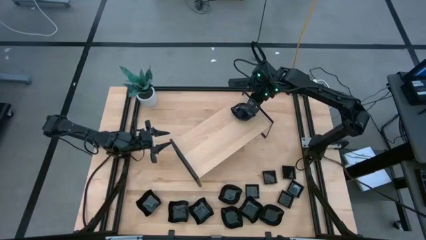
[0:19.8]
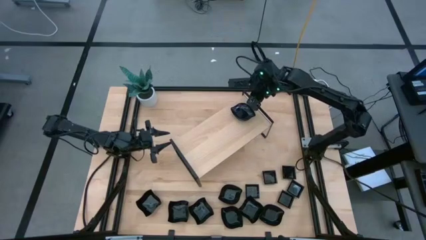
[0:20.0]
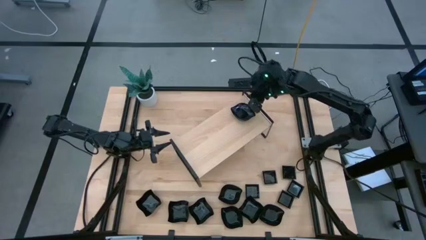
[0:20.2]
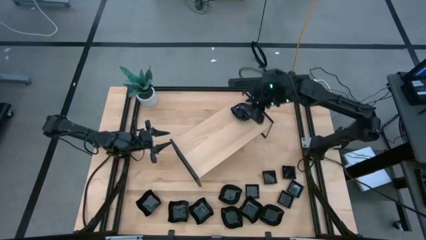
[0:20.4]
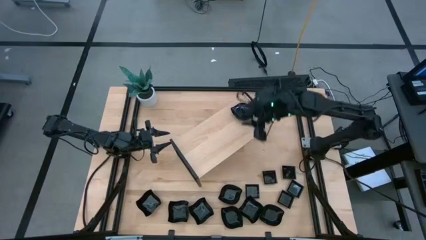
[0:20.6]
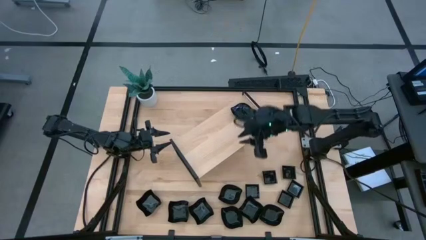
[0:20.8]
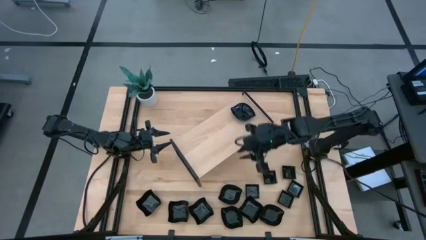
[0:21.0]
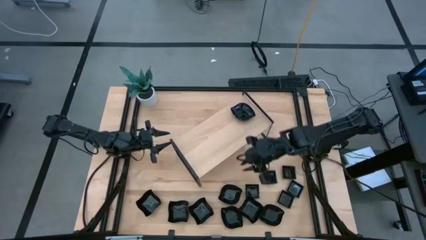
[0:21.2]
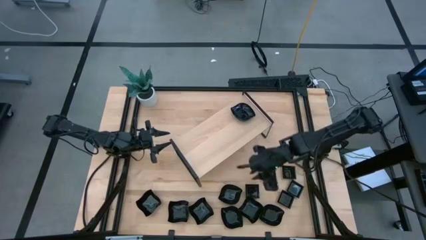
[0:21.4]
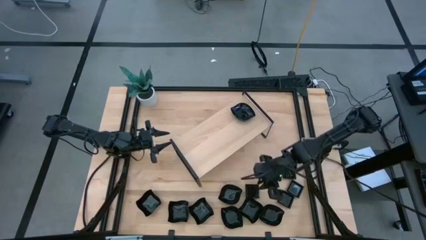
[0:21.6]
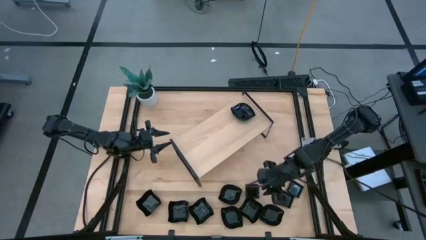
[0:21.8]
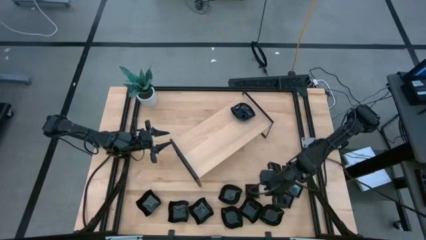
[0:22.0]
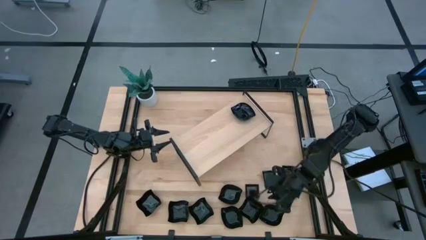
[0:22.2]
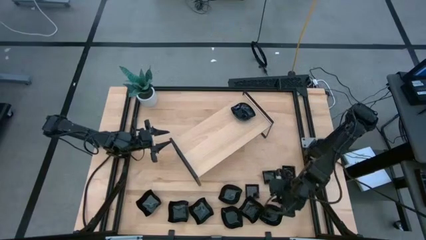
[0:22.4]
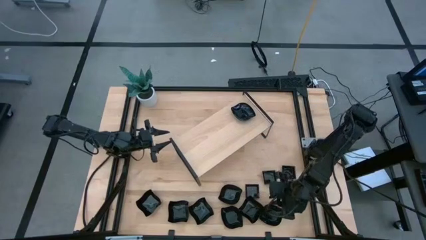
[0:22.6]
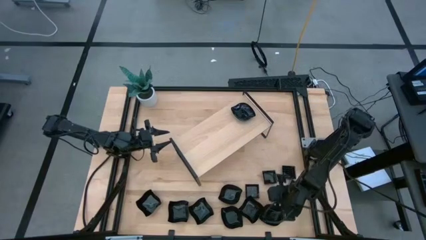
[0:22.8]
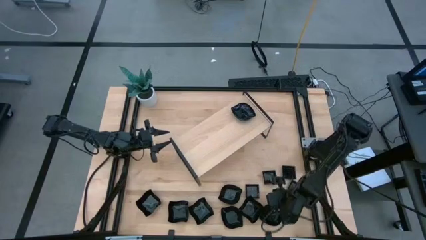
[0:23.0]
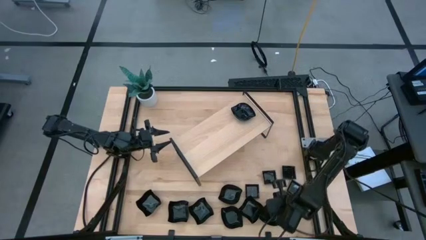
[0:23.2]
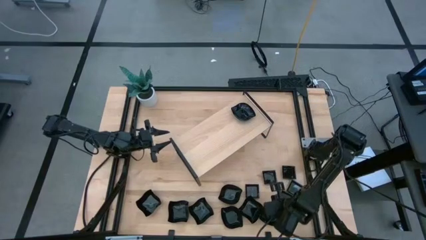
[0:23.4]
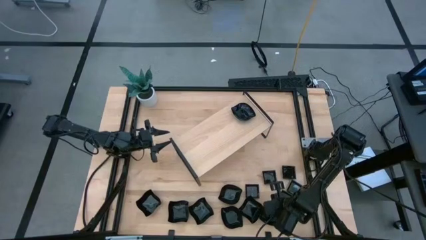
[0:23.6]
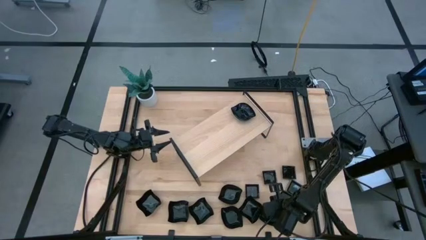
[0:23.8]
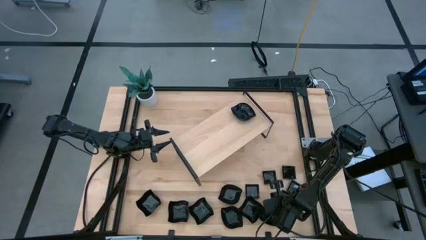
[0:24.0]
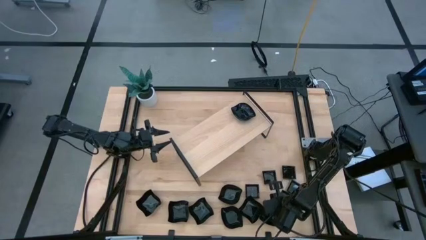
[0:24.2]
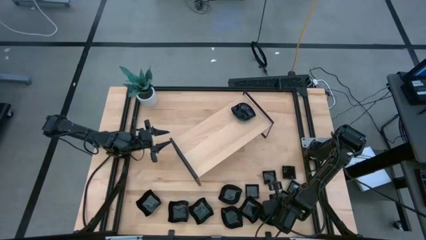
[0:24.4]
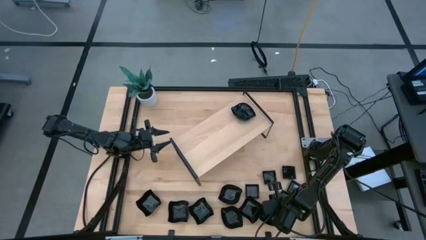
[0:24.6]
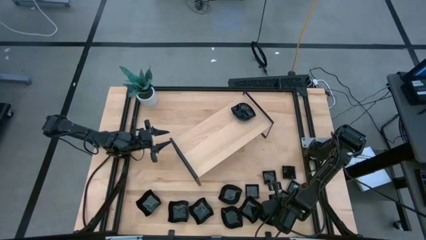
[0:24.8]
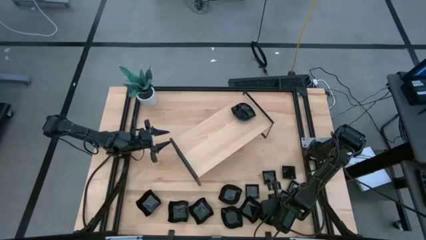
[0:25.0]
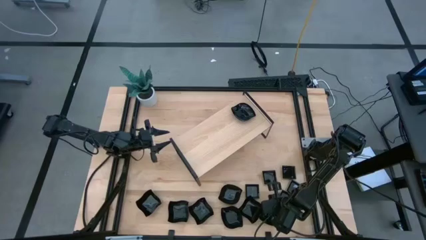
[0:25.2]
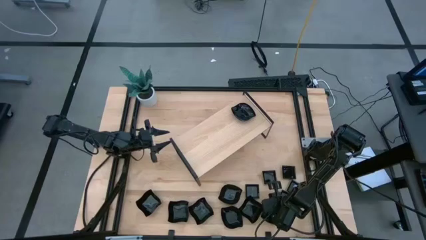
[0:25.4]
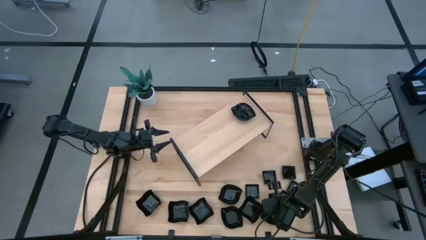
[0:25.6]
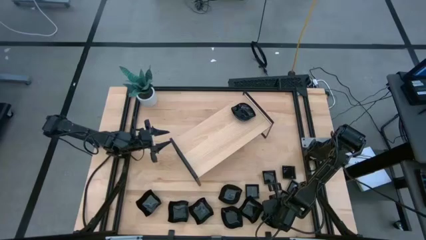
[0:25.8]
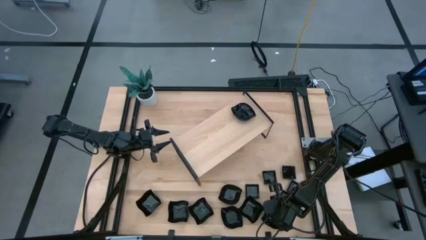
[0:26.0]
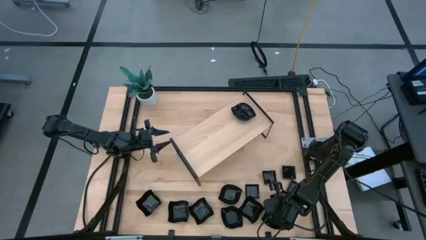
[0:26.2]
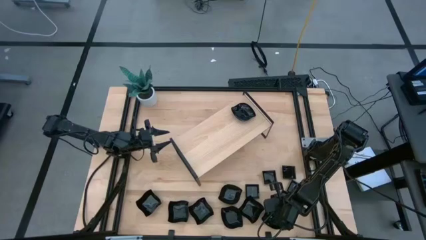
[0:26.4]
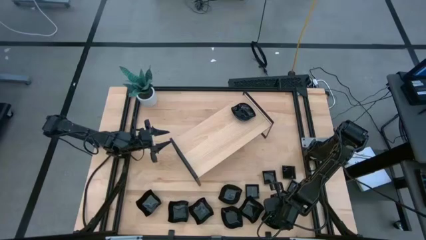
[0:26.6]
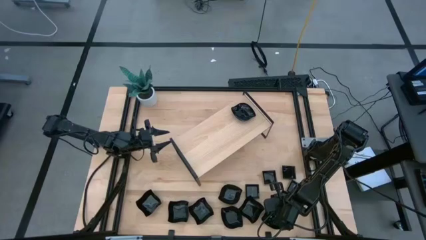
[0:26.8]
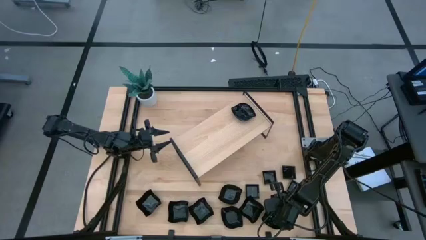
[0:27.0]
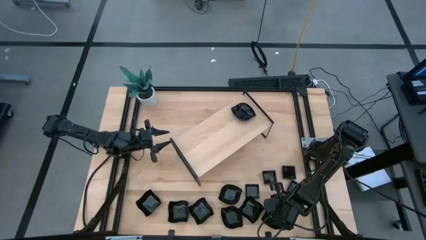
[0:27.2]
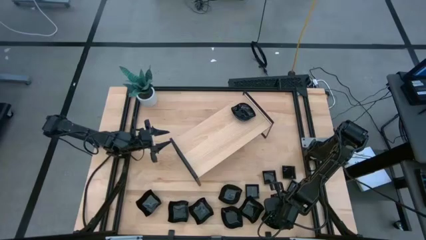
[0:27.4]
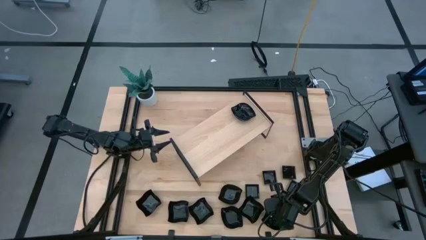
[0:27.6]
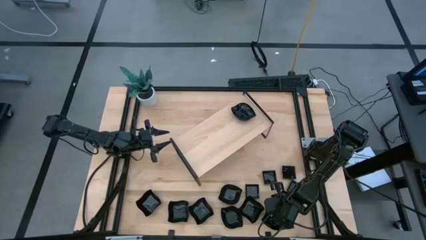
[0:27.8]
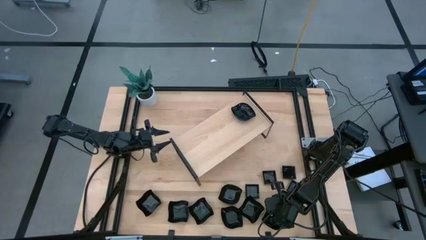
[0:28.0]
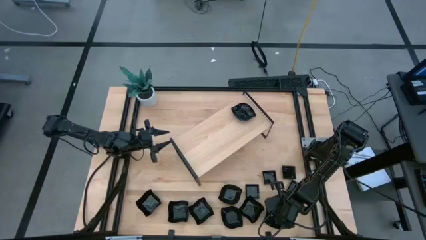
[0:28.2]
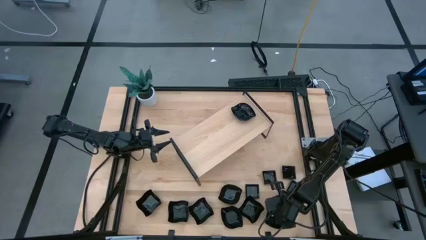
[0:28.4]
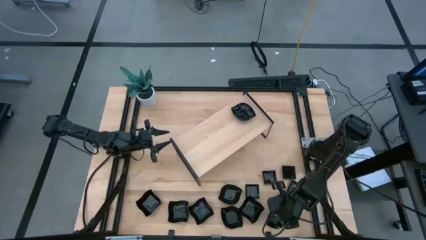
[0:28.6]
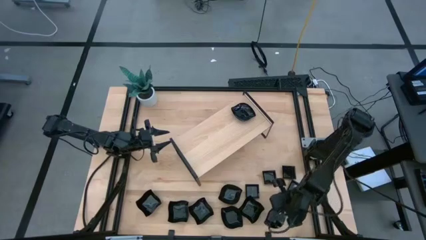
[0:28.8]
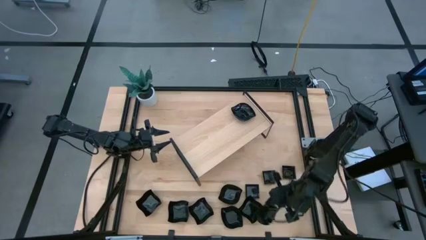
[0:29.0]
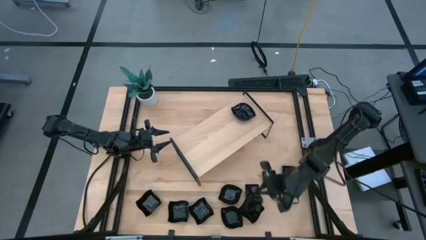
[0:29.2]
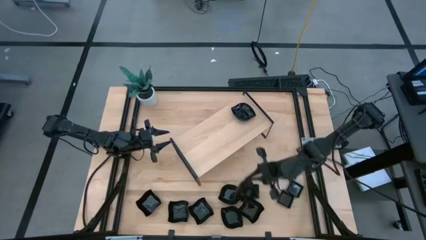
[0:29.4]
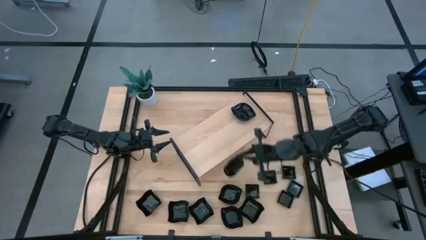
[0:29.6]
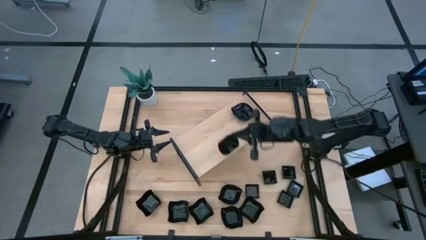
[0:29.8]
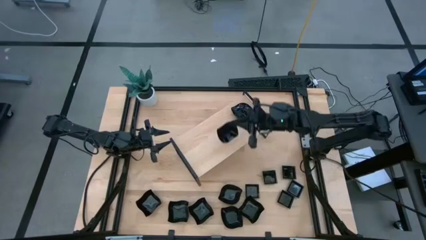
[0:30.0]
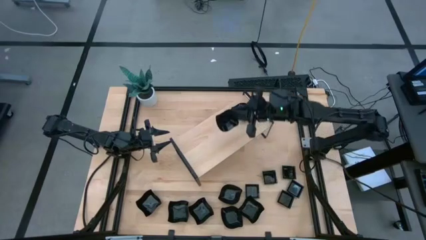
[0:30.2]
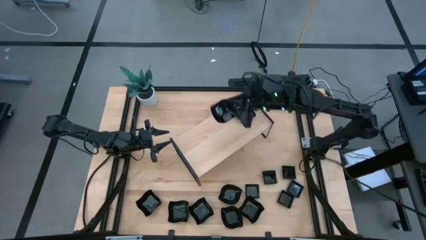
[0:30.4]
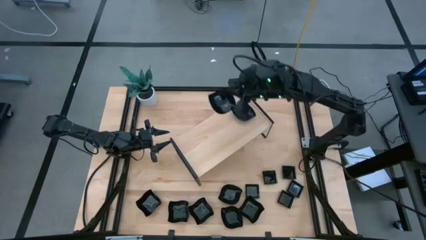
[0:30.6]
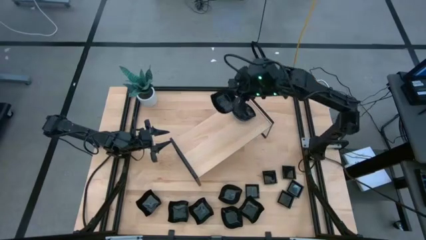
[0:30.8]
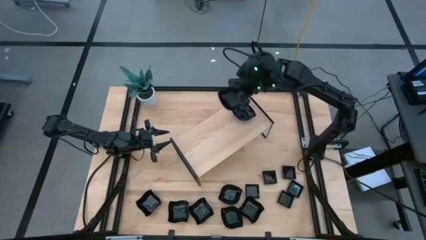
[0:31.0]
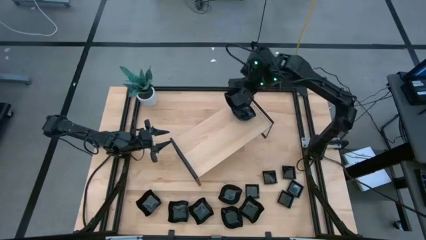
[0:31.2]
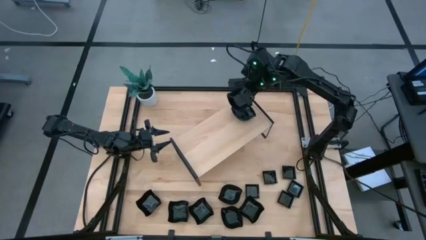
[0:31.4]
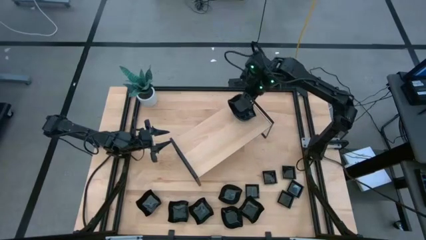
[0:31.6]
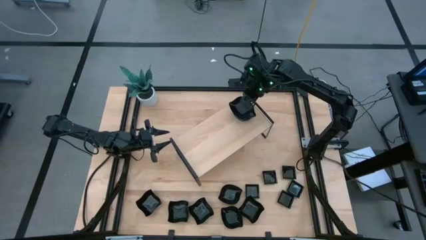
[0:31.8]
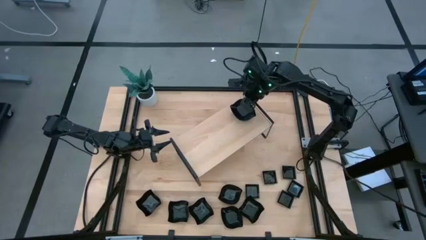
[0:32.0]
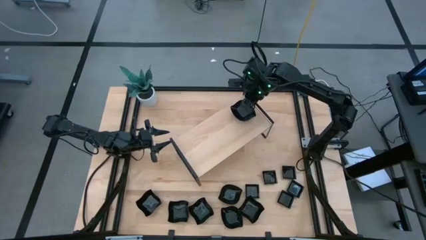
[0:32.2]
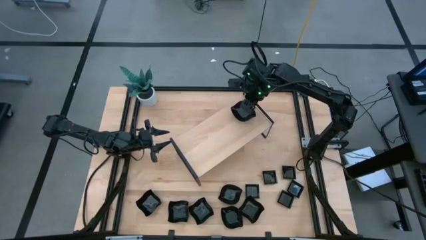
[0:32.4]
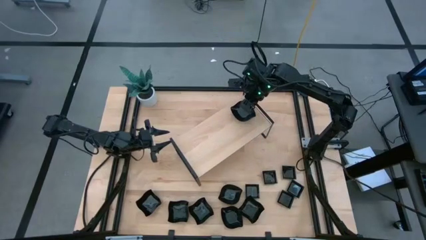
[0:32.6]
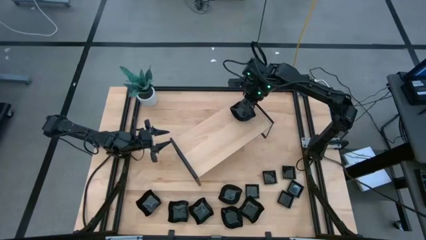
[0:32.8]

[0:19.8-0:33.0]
Task: Pick & Place Mini shaped plates
Stack the leaf shaped plate on top of the other leaf shaped plates on the shelf

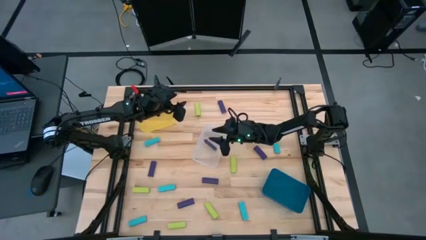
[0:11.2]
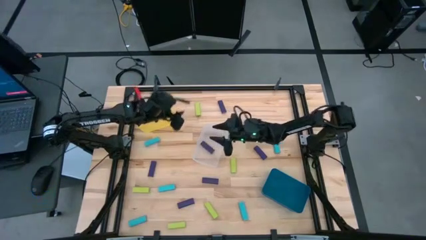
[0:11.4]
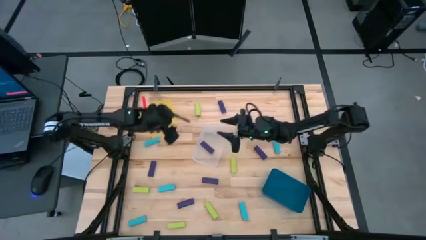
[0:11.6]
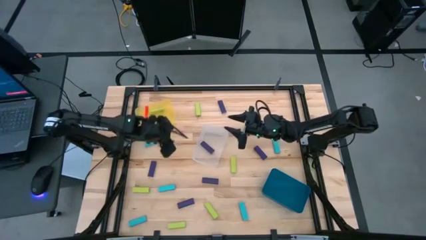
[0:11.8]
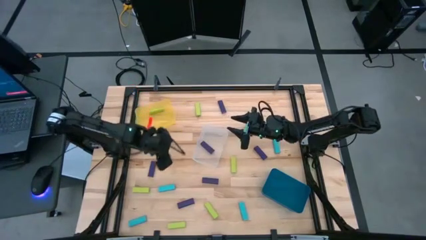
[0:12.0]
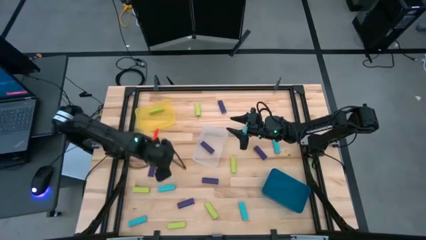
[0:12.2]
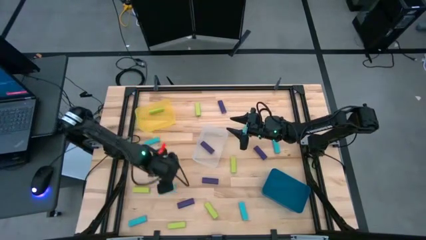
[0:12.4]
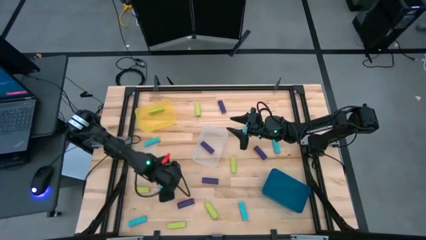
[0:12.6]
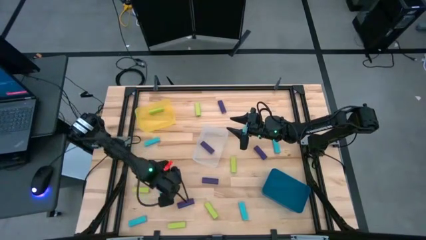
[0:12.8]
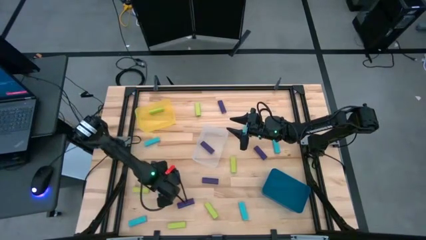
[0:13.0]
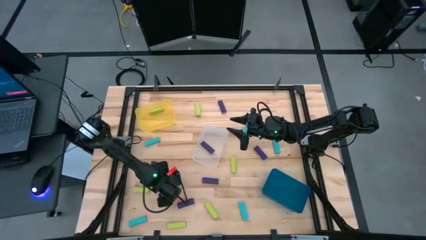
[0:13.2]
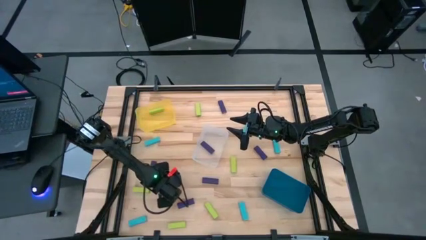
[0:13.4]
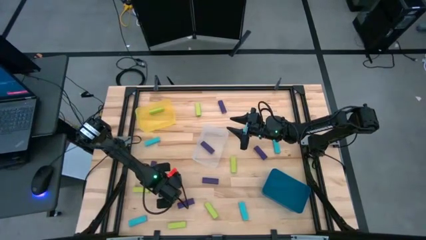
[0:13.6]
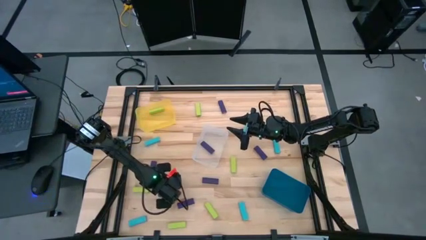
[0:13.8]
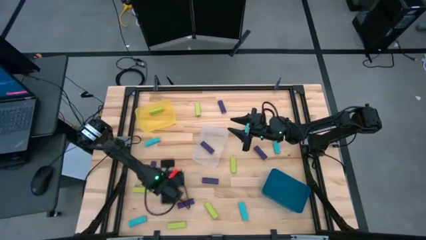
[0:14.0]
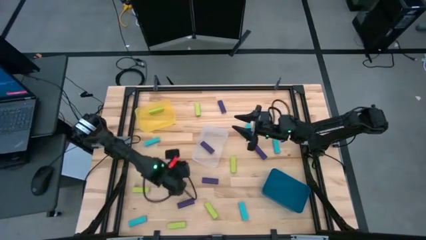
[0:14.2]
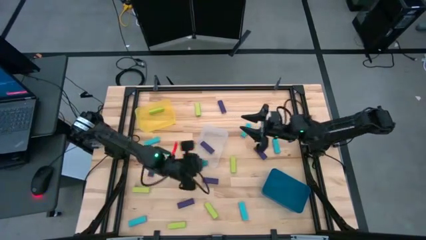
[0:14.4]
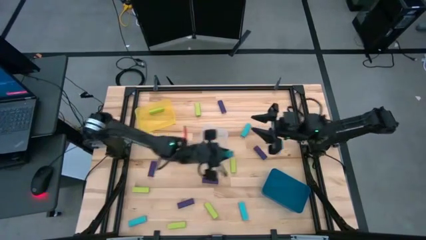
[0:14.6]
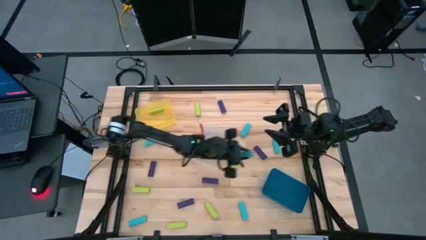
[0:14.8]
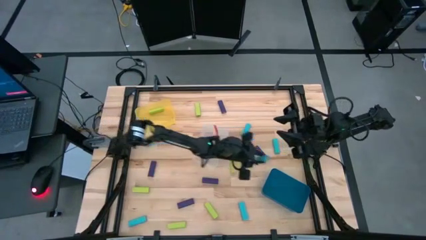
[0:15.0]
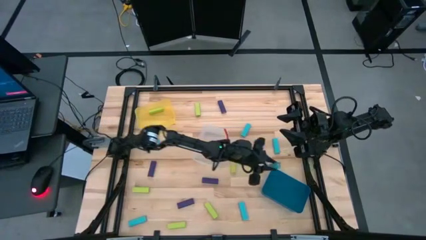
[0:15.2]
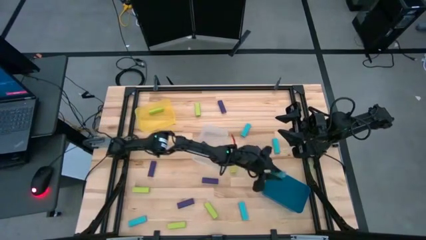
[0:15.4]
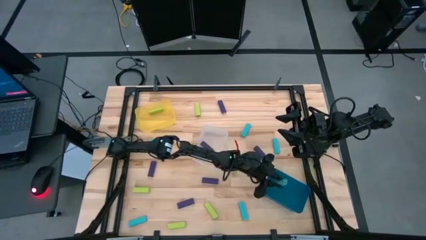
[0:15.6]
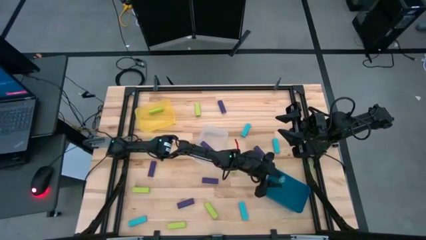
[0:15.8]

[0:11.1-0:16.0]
Task: Sort blocks
Put the blue block into the blue bin
